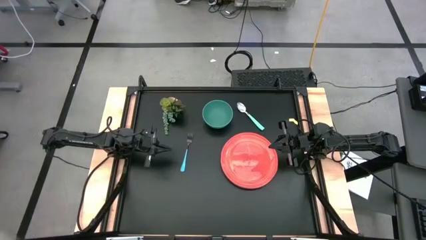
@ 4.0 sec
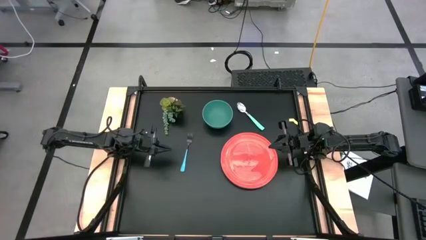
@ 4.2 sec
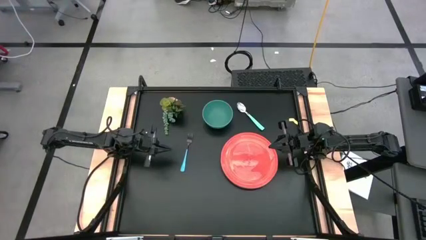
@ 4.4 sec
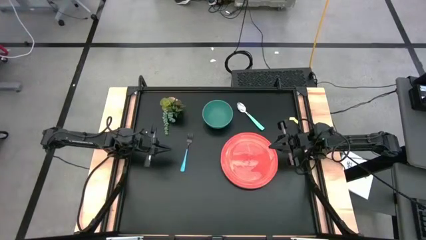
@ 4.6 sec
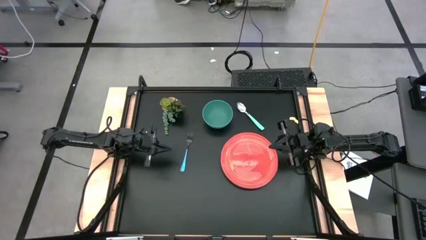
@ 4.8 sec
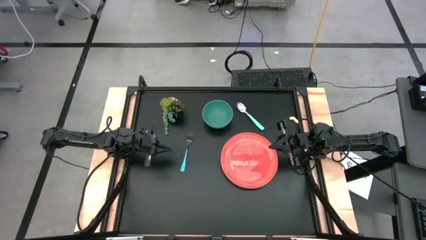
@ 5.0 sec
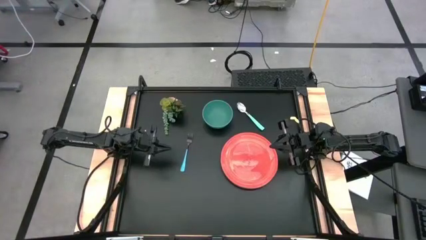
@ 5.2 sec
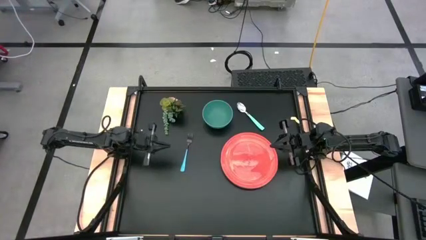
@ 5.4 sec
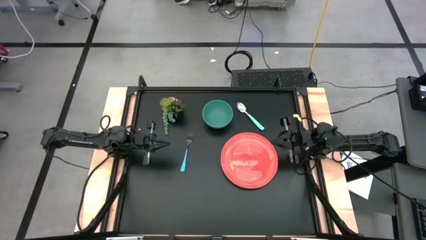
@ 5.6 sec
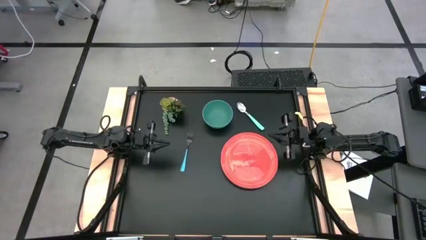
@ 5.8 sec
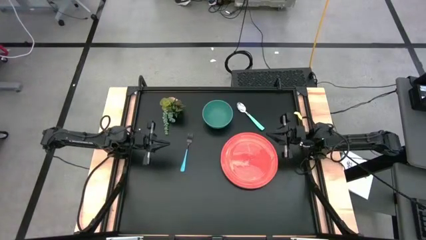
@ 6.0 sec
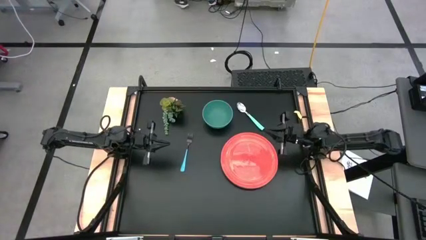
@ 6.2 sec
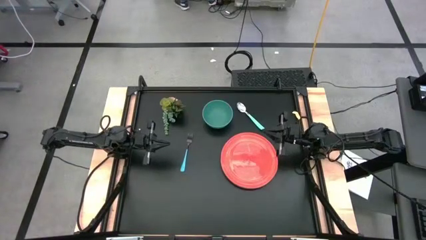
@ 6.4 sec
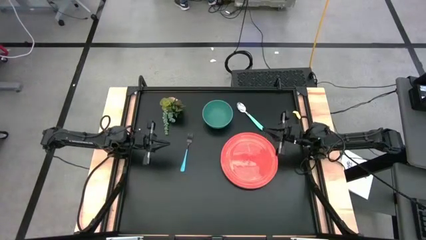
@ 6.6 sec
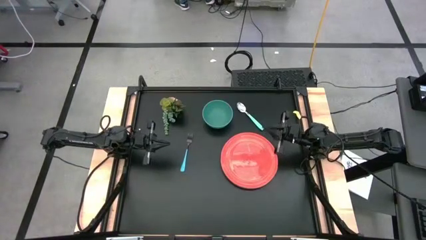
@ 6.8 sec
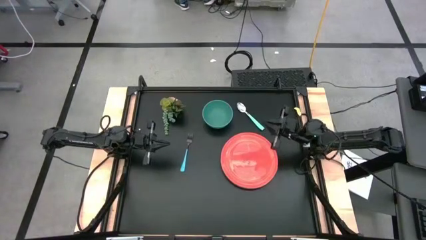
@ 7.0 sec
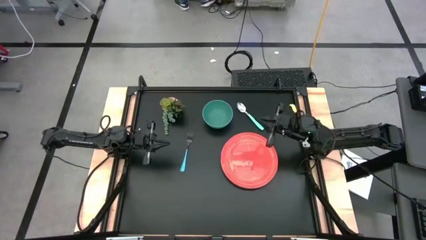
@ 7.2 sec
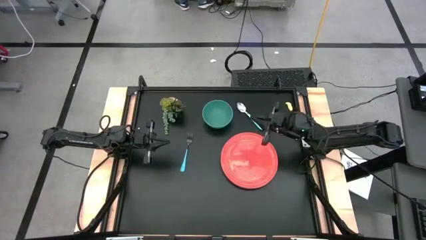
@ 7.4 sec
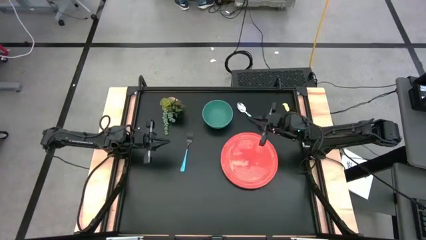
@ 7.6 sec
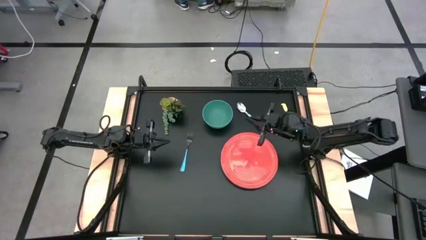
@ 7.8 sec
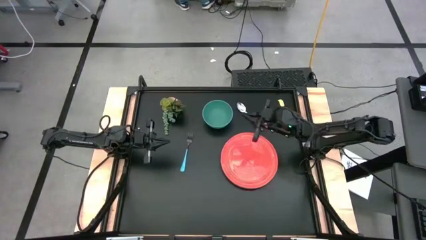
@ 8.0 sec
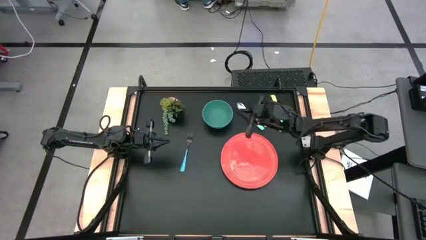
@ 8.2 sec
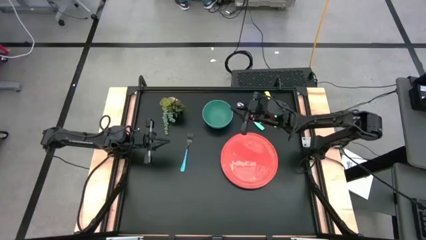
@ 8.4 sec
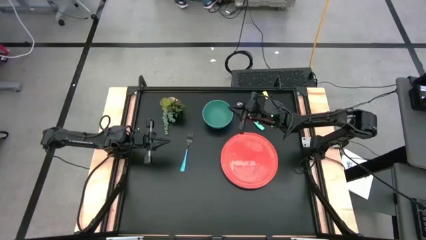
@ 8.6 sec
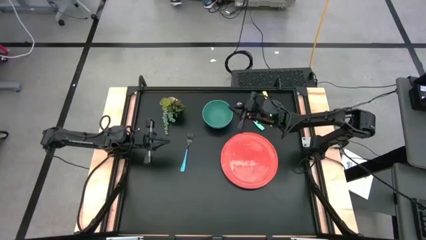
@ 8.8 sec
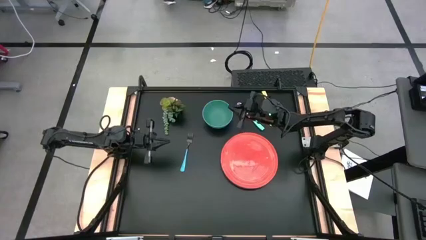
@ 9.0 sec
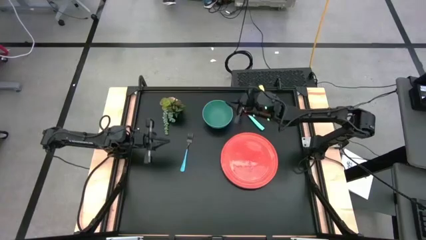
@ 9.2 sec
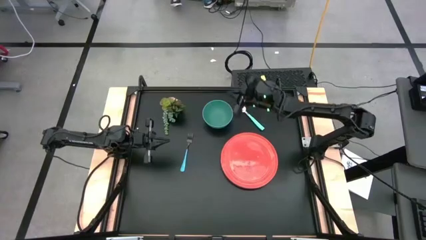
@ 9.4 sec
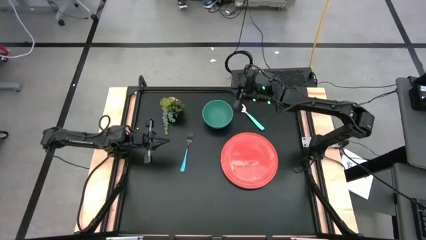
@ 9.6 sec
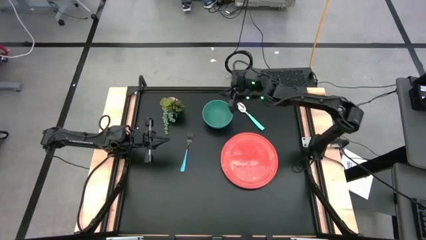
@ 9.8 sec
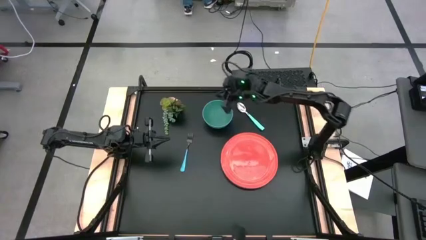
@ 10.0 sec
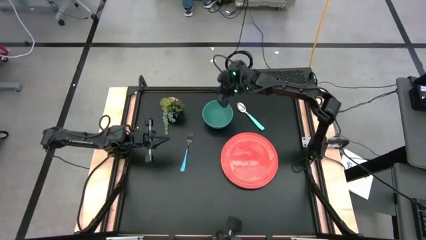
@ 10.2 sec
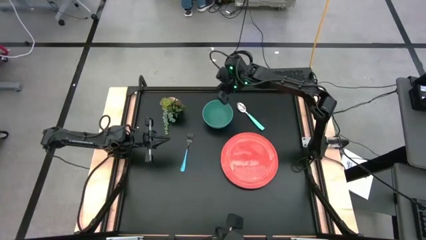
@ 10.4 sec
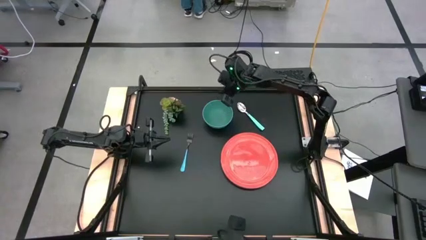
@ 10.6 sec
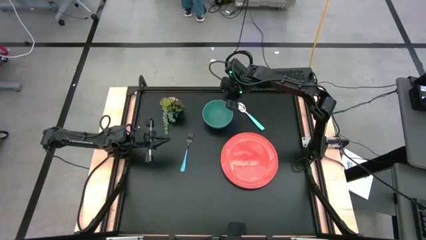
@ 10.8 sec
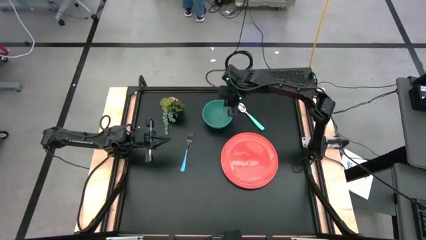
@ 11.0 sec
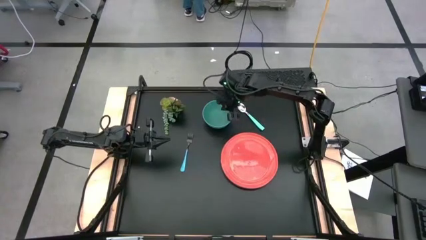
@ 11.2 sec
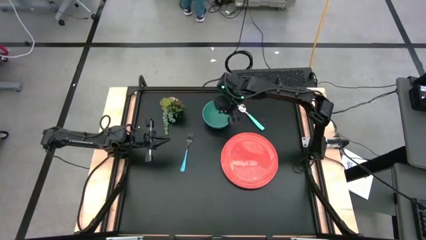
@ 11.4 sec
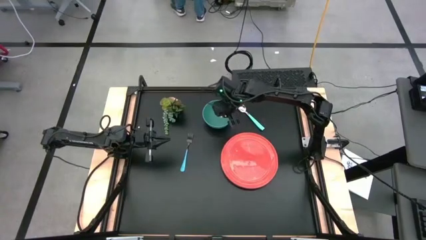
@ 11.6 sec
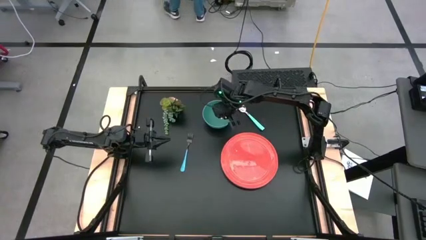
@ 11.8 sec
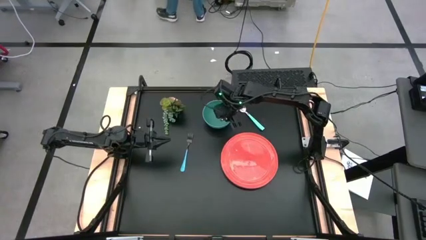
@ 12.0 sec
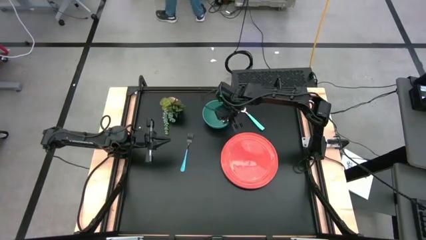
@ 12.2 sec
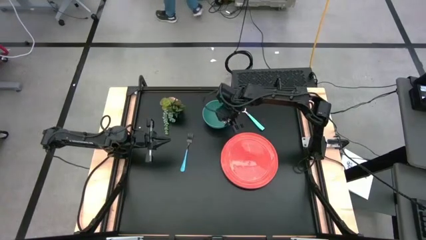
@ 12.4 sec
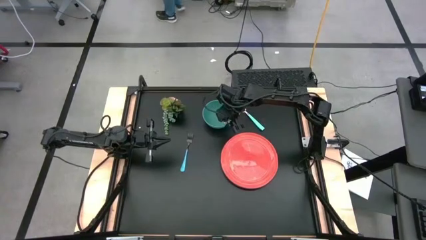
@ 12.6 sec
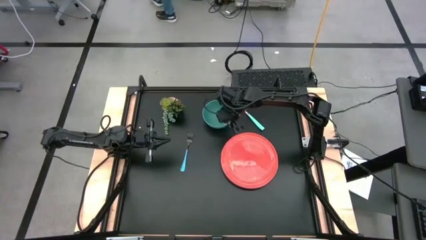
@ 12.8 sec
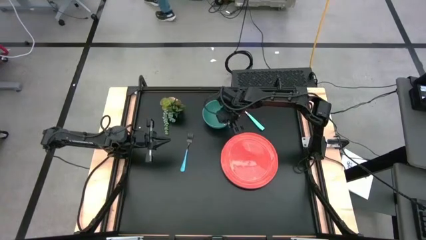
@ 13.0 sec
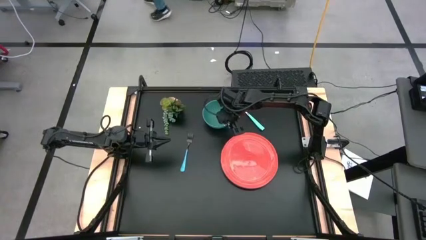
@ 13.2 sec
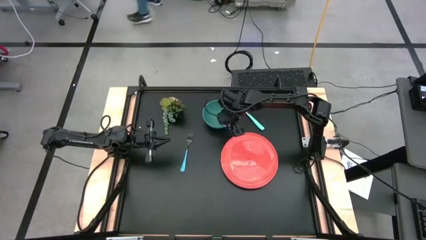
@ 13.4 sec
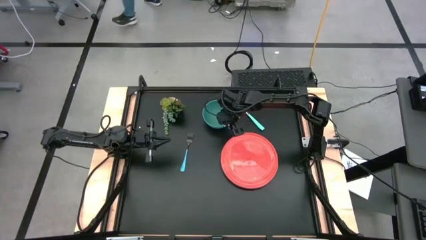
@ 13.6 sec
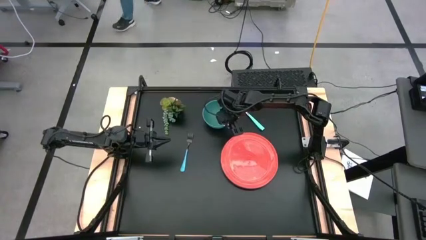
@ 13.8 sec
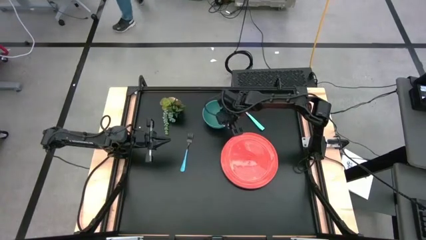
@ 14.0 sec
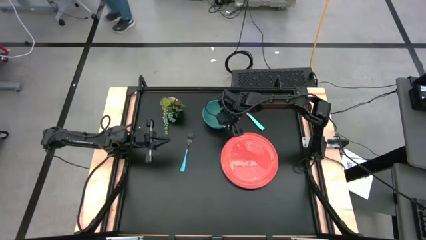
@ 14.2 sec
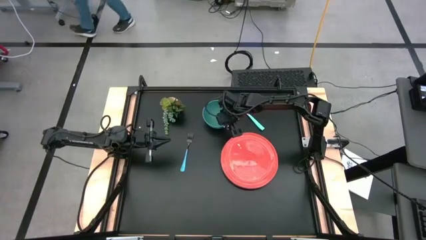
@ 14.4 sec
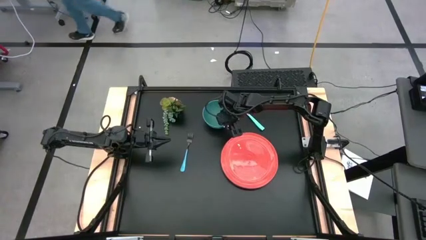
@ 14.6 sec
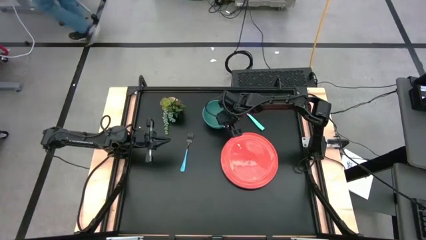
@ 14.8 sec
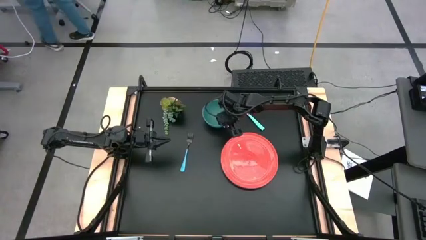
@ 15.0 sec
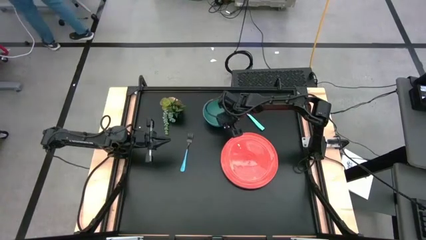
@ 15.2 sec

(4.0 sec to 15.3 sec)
Task: Set table place
Put the green bowl on the orange plate
